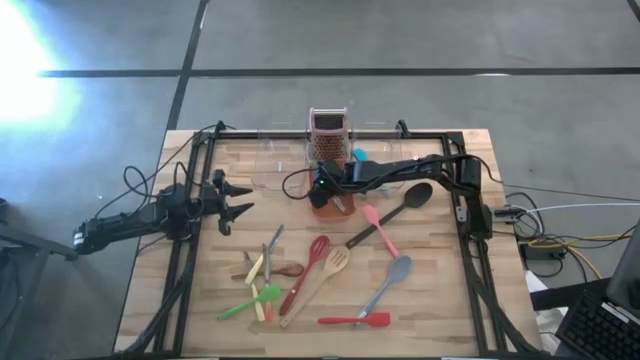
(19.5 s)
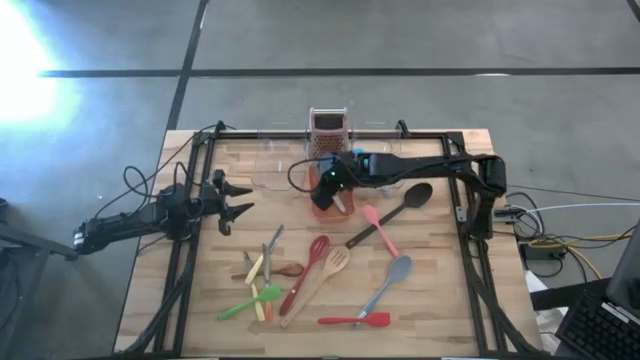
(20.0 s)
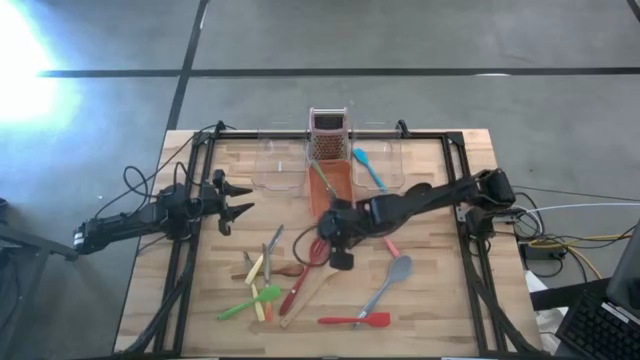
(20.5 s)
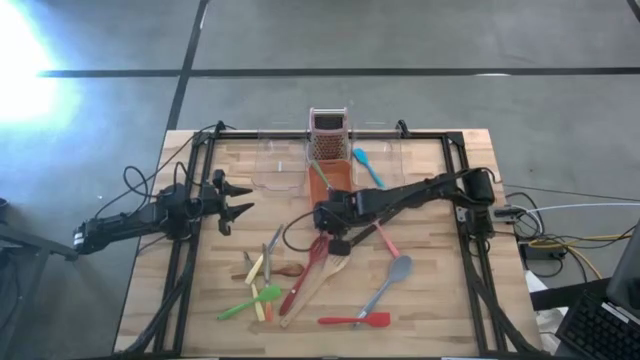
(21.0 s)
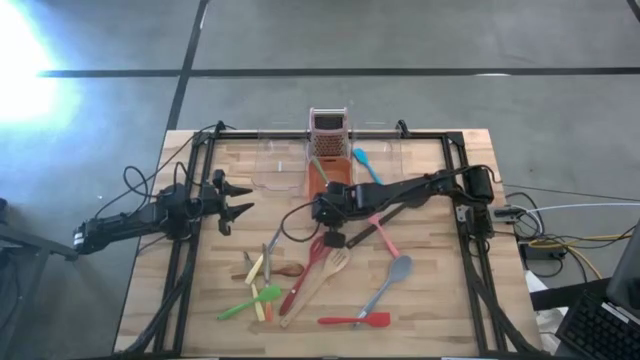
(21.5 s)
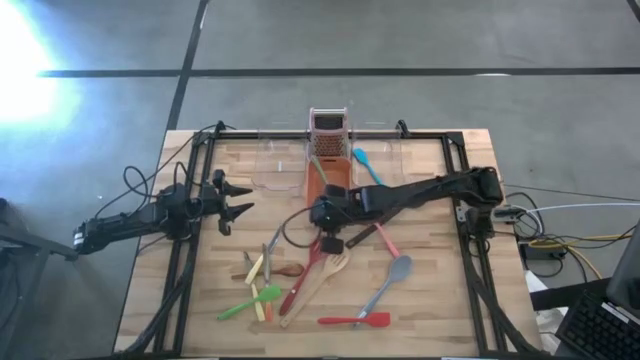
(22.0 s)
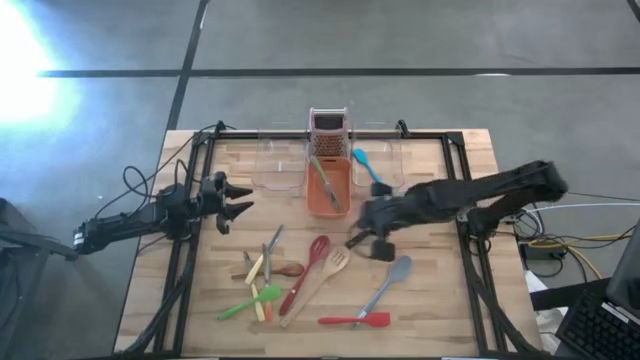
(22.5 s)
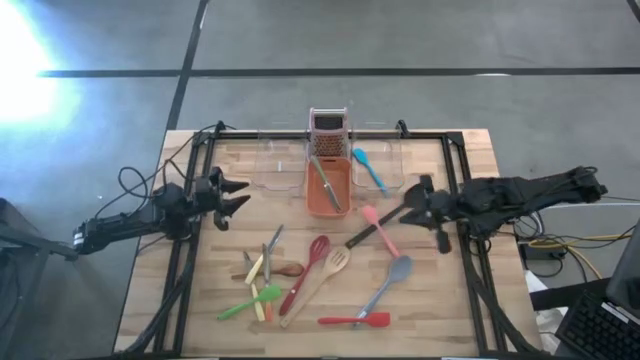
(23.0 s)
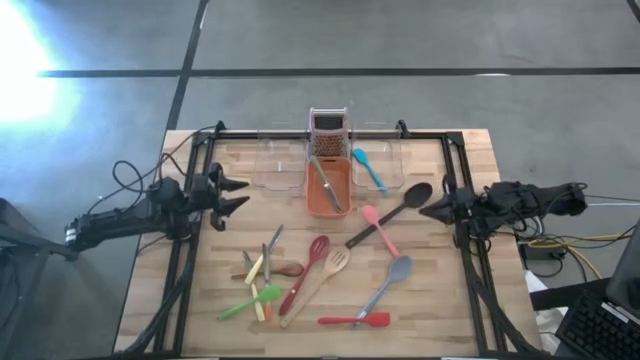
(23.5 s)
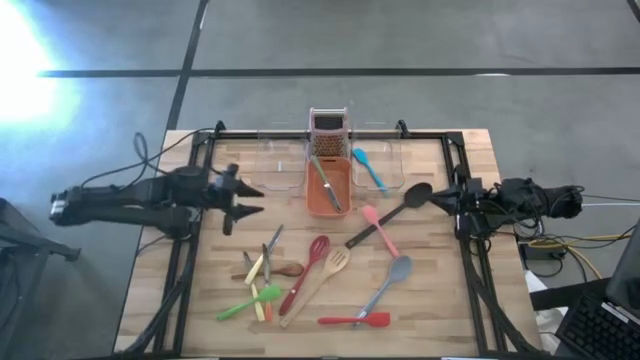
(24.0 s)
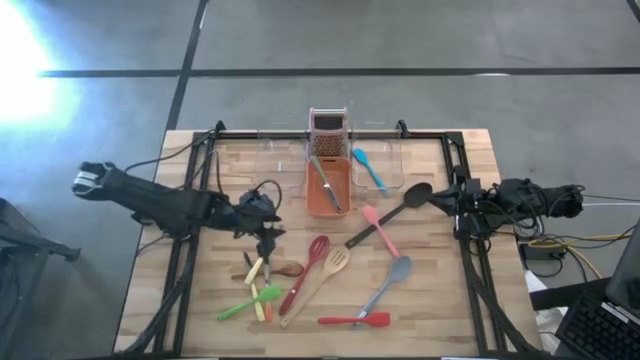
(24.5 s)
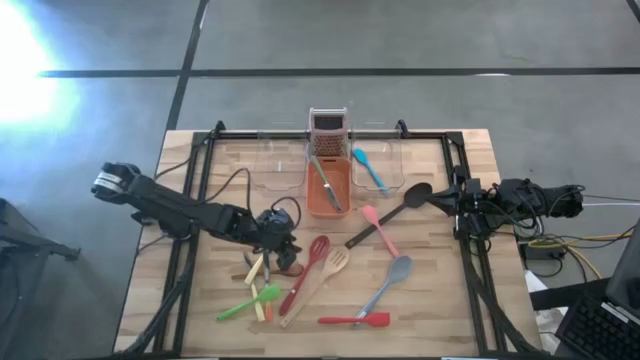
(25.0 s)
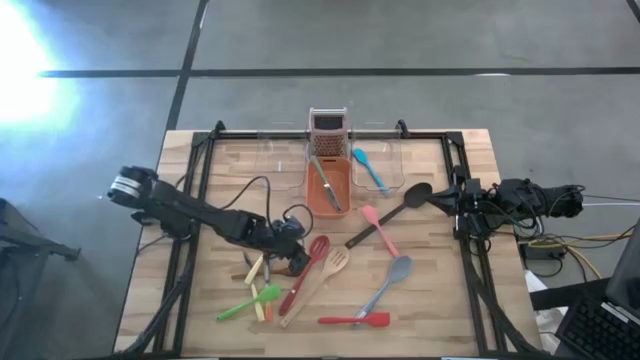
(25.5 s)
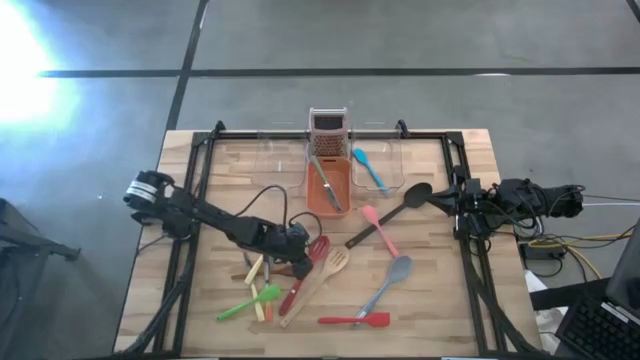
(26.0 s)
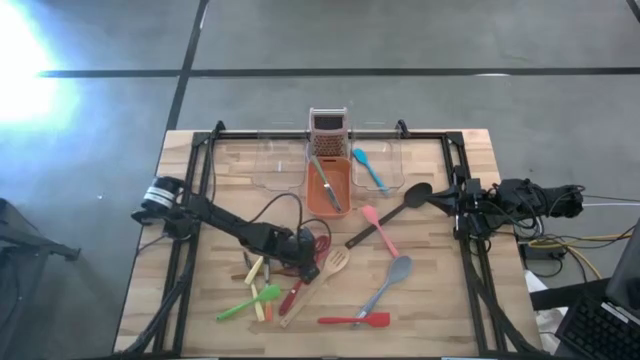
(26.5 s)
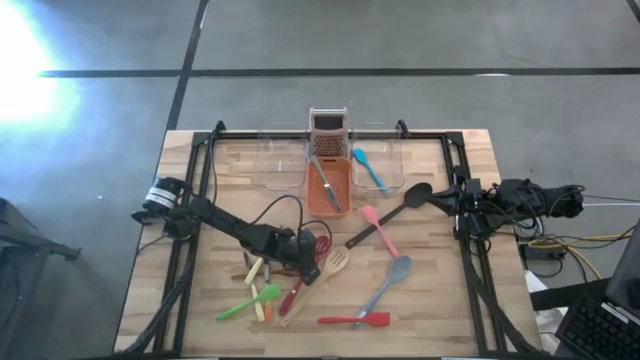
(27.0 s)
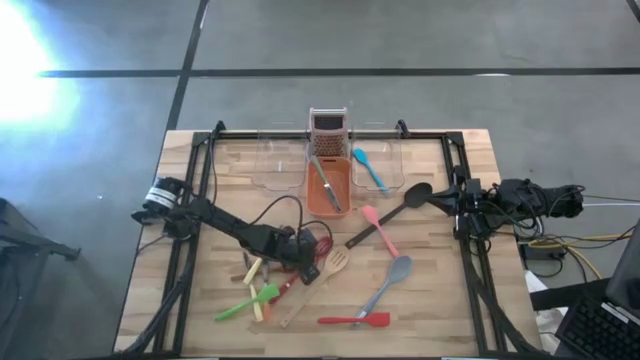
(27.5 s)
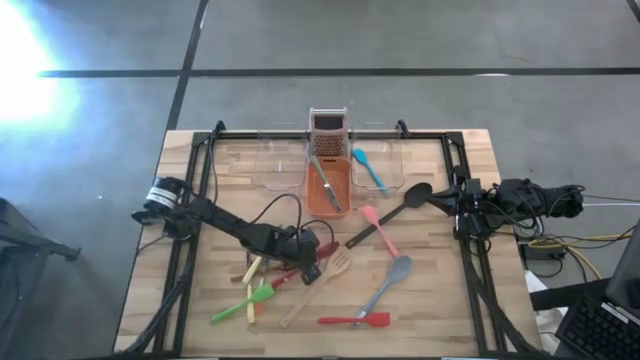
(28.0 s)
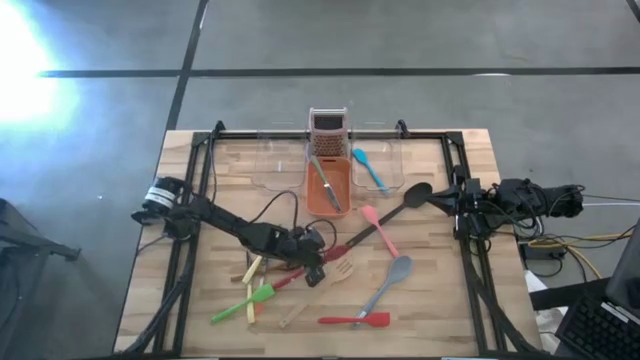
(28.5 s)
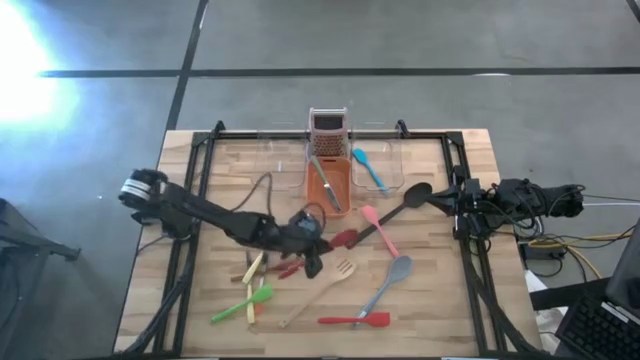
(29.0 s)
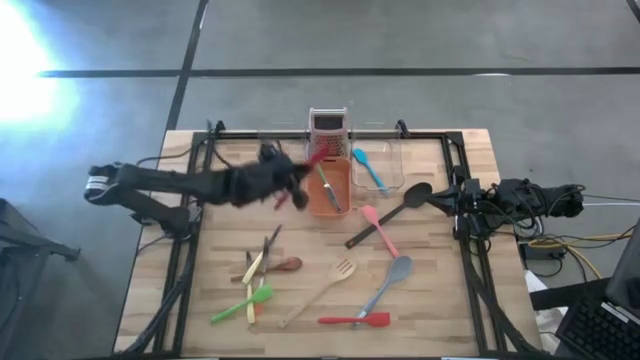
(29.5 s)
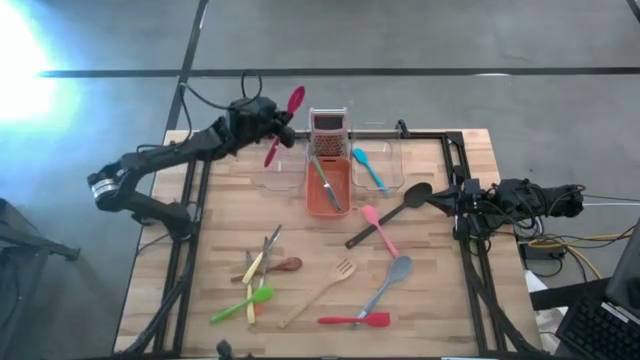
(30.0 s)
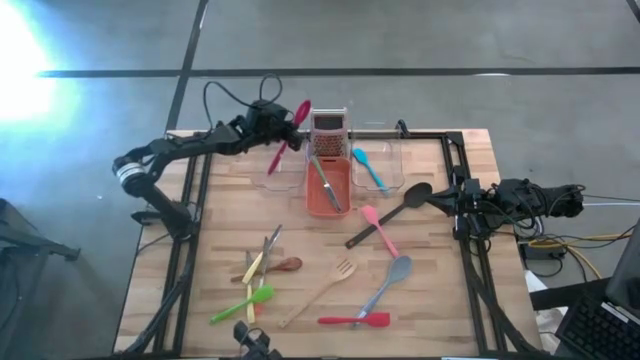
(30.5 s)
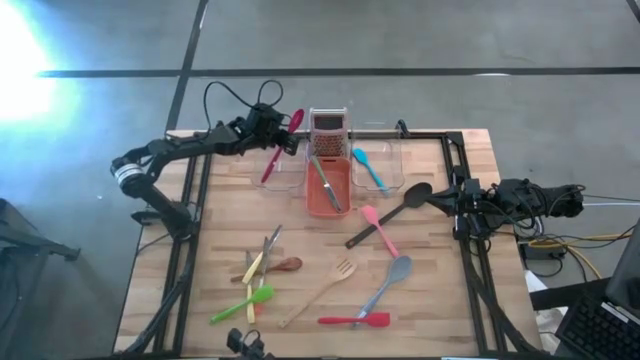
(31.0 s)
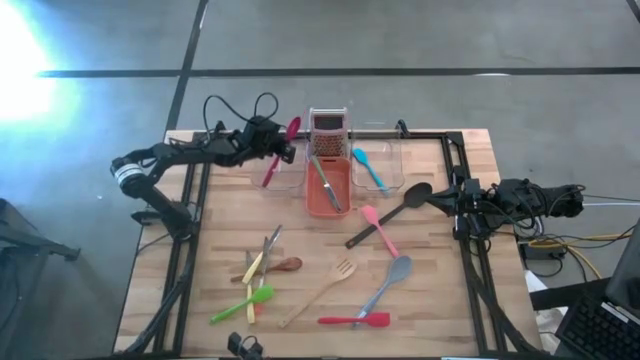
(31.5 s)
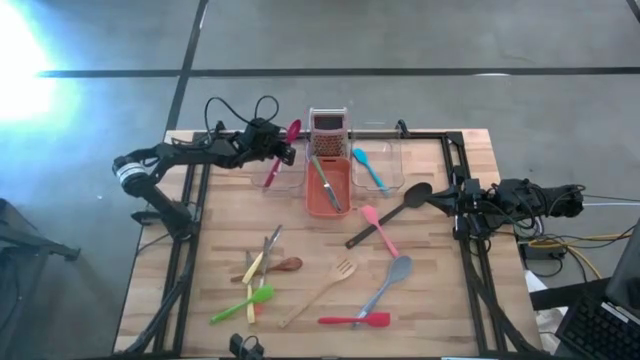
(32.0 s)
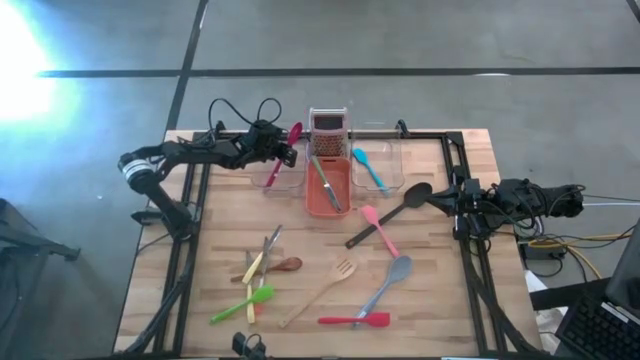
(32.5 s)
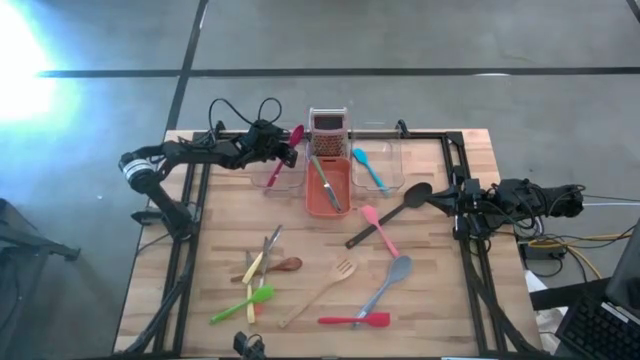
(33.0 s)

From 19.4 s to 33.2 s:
Task: Pick & Place Kitchen Items
Put the red slotted serving spoon into the left transparent bin

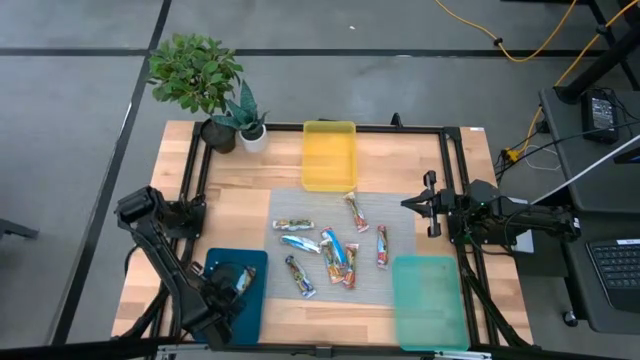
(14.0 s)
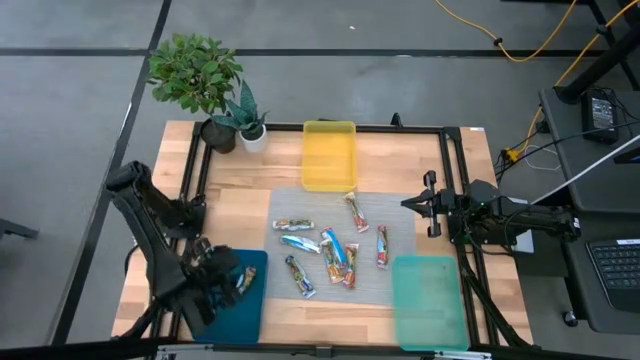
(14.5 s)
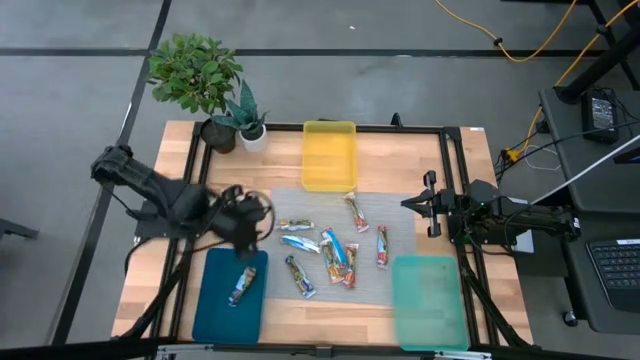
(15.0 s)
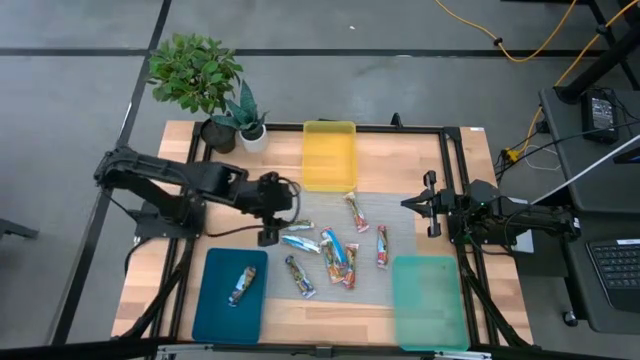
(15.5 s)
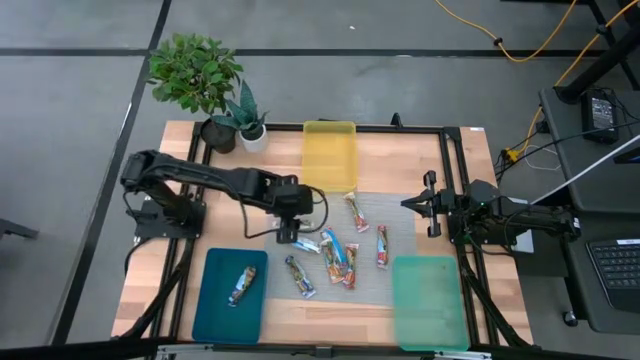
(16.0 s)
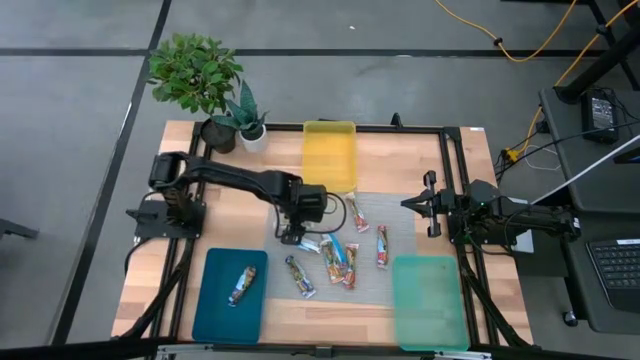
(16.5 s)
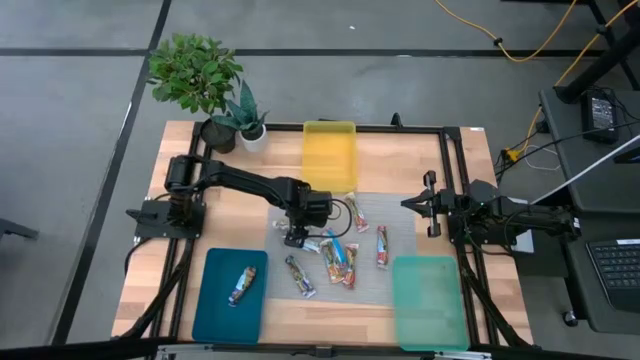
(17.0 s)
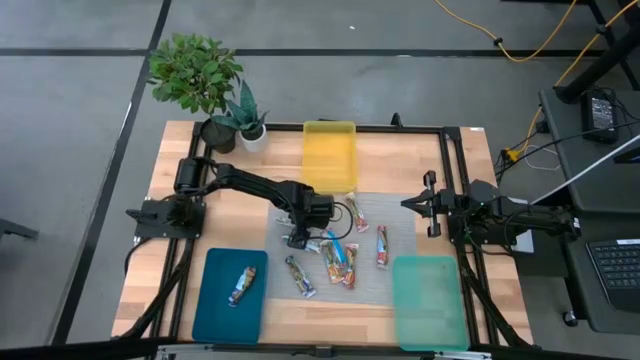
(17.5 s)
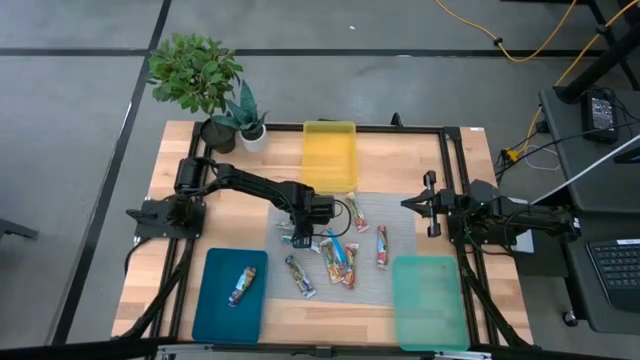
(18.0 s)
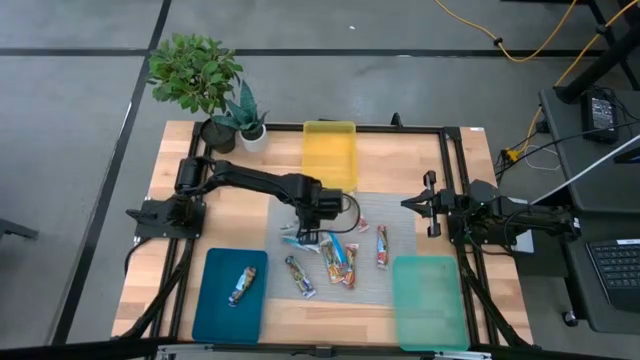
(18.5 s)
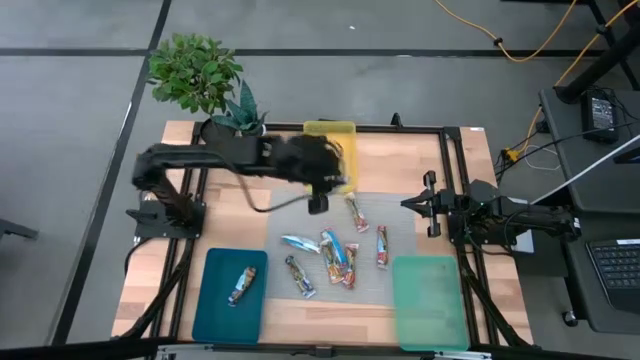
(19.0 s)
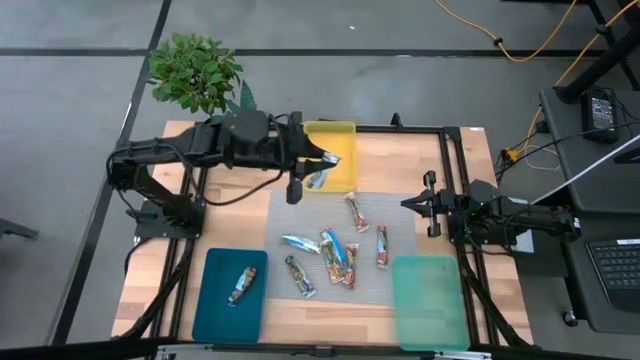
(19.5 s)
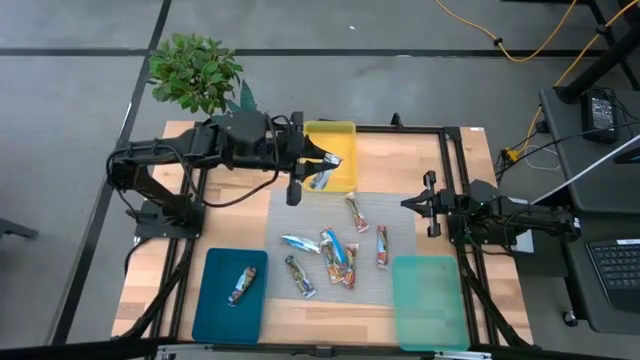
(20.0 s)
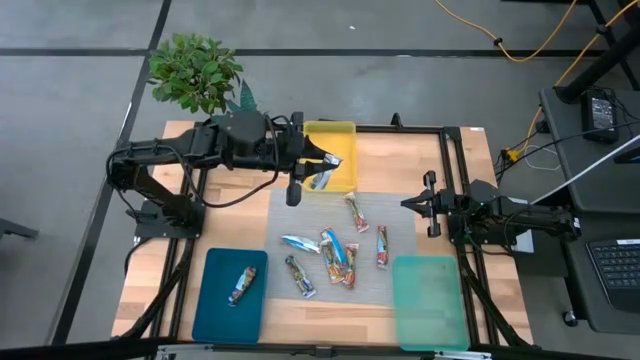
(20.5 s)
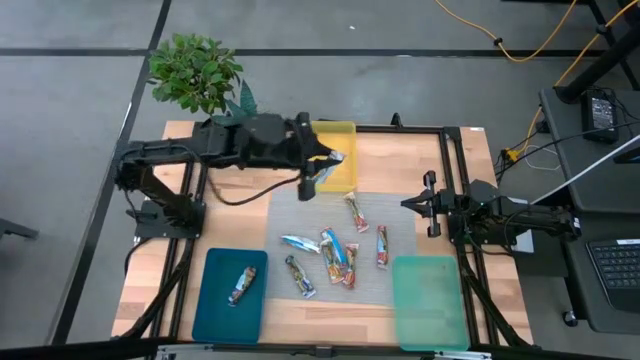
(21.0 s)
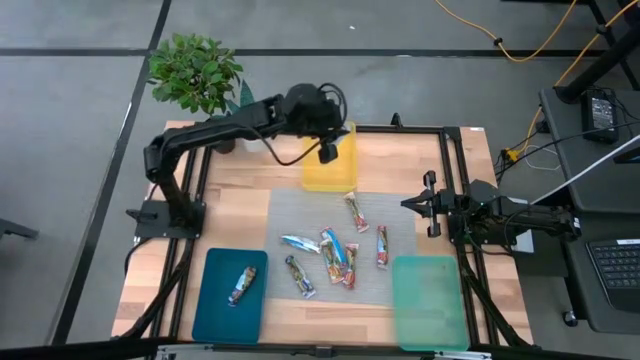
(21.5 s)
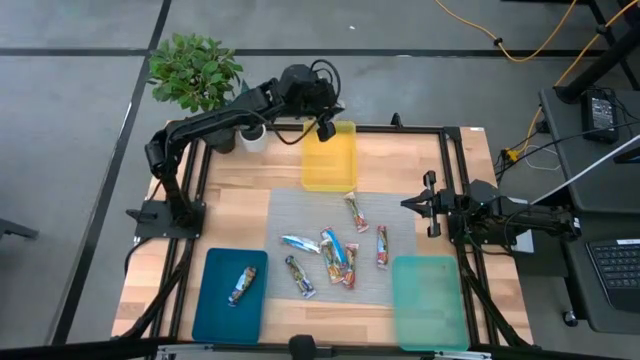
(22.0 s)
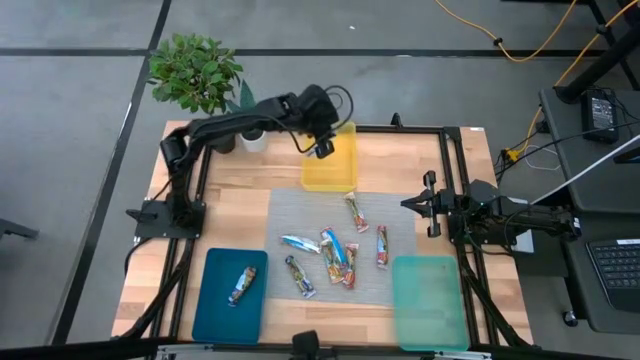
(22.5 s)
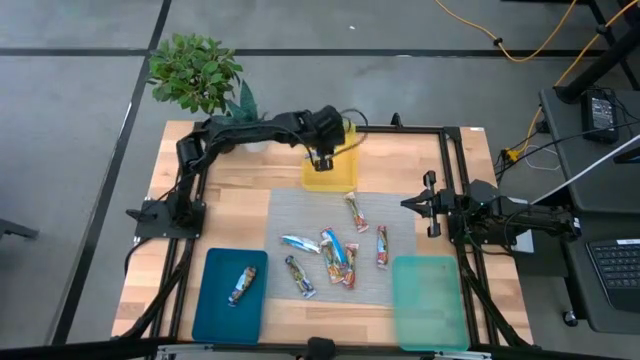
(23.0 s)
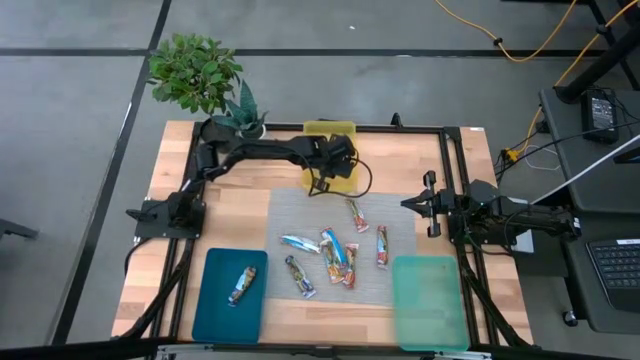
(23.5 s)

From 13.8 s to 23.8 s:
Task: Pick and place Granola Bars by type
Put the top yellow granola bar into the yellow bin
